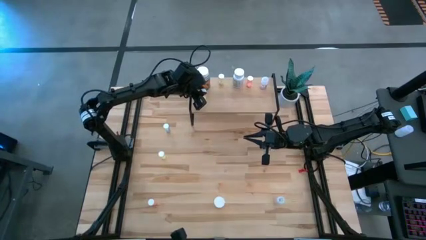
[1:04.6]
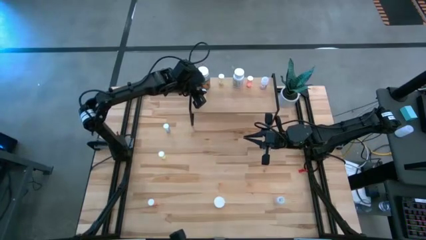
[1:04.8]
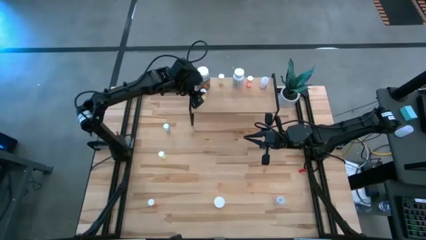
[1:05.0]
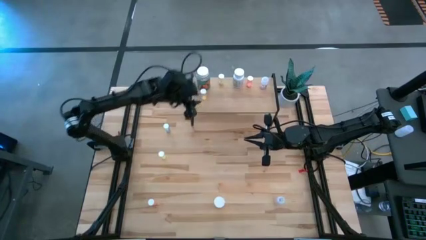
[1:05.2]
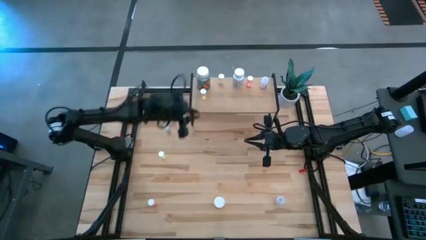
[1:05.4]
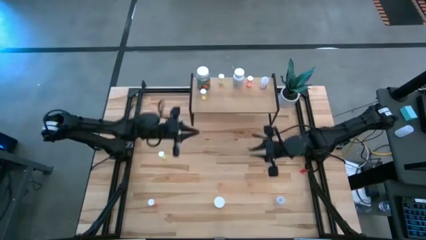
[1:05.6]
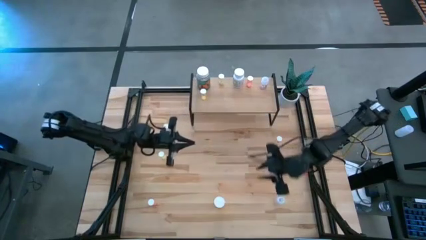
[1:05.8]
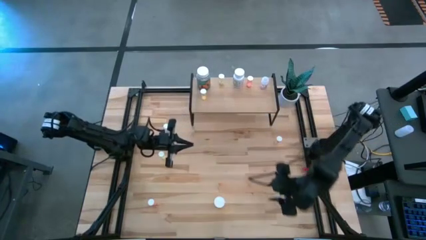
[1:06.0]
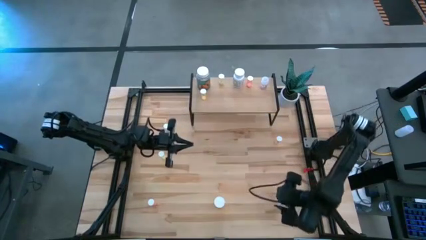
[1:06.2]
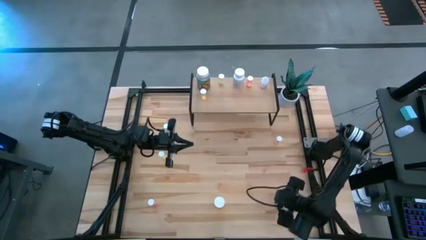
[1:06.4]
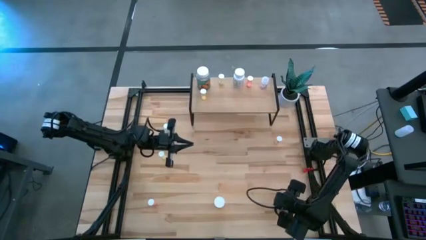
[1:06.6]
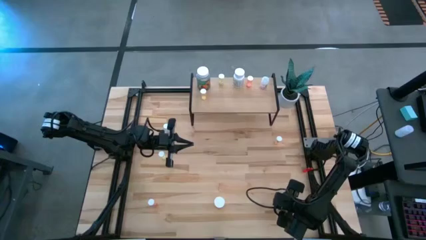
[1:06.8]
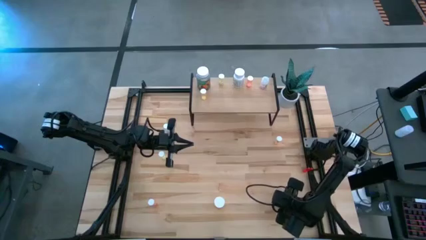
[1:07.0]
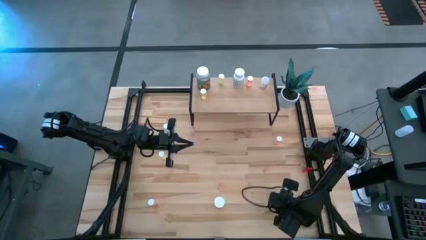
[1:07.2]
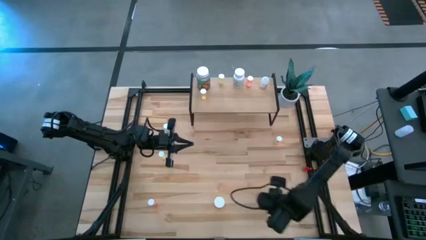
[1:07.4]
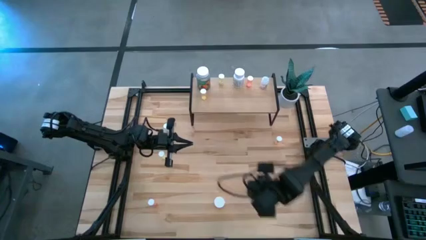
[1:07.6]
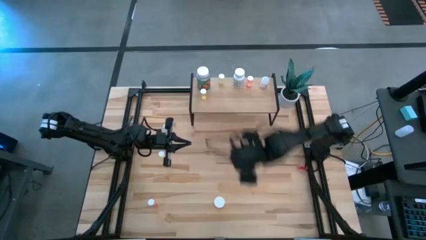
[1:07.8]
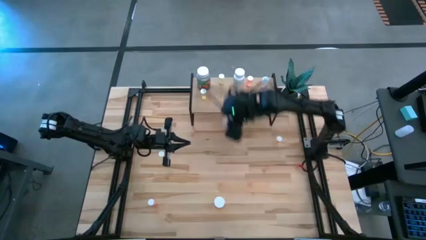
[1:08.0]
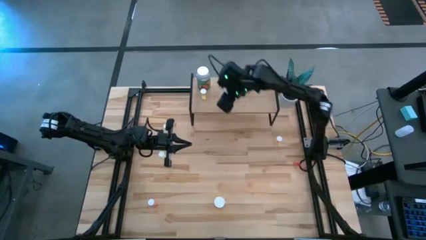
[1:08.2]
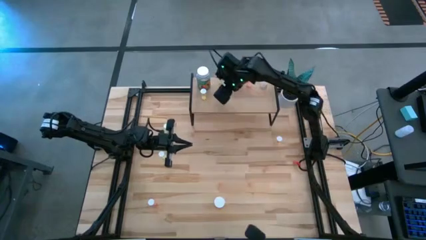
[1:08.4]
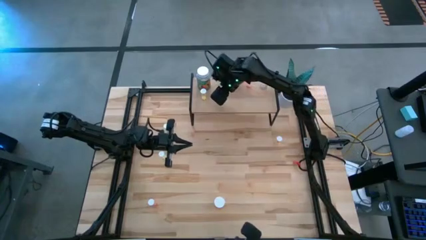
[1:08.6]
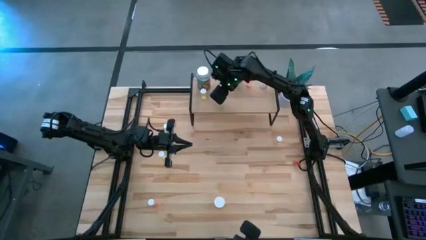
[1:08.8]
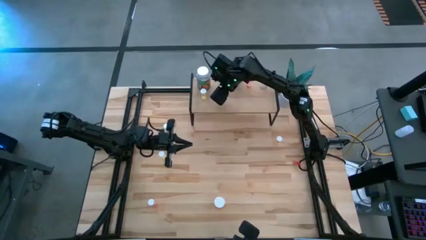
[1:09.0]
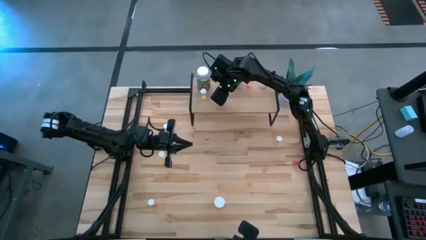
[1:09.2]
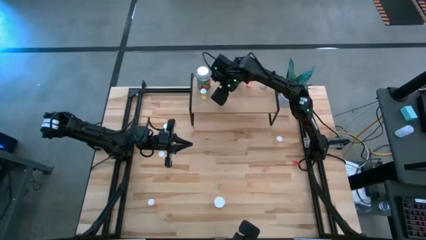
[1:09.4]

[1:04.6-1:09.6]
Task: Pick and place medicine bottles onto shelf by color
Put the transparent pill bottle on the shelf

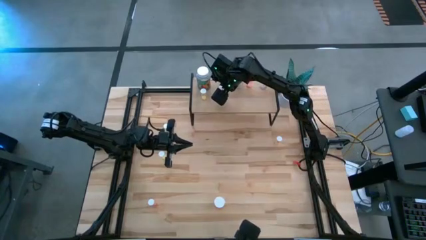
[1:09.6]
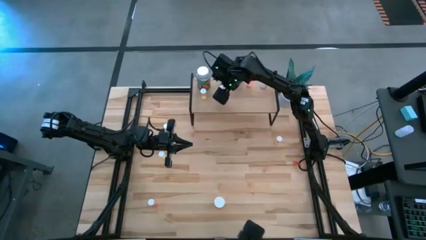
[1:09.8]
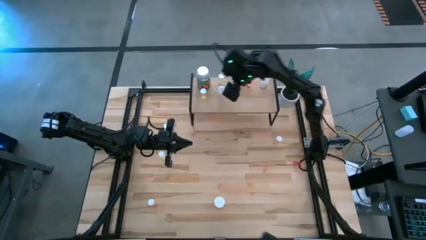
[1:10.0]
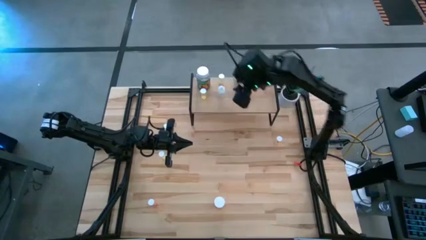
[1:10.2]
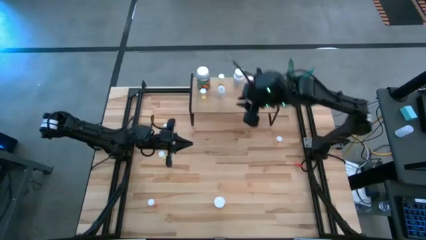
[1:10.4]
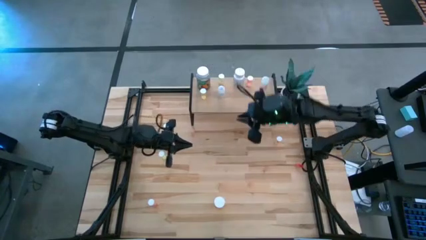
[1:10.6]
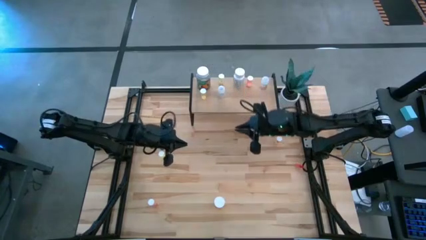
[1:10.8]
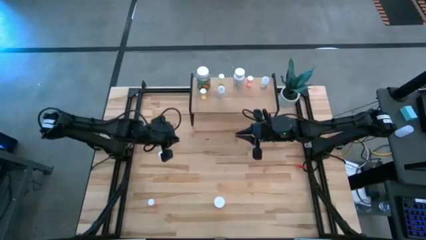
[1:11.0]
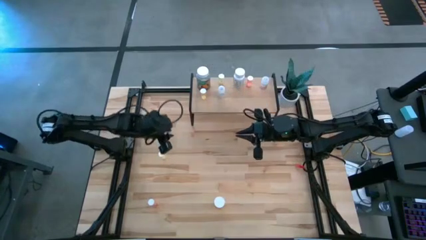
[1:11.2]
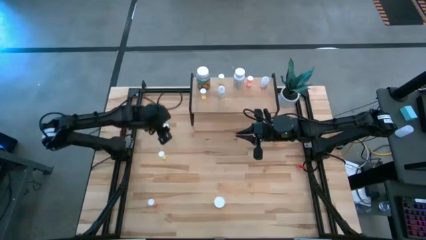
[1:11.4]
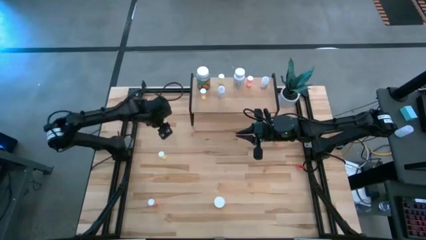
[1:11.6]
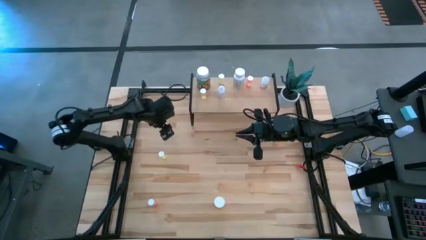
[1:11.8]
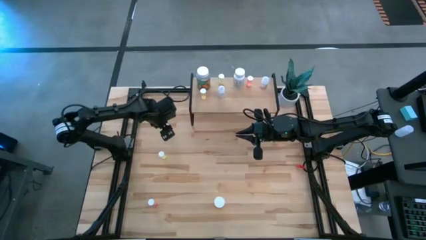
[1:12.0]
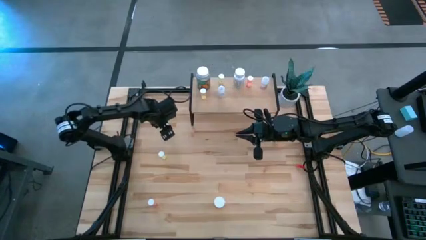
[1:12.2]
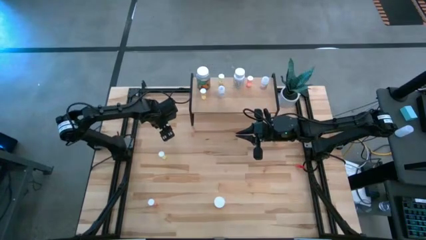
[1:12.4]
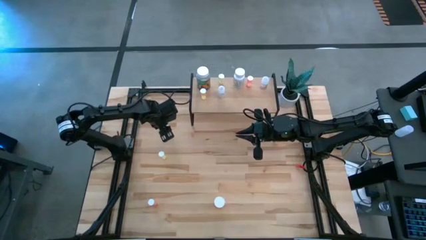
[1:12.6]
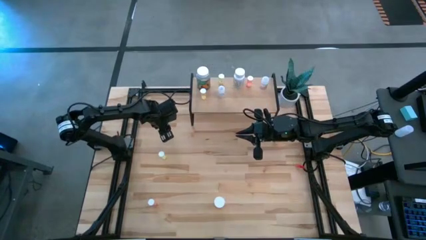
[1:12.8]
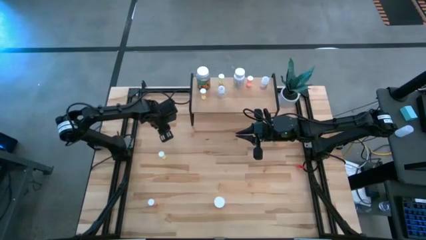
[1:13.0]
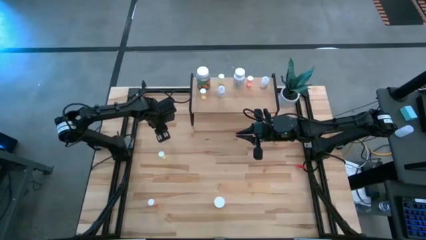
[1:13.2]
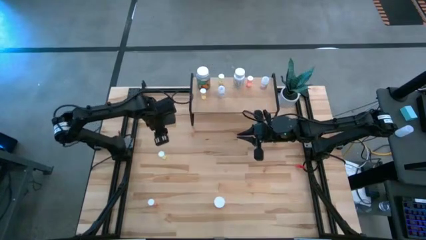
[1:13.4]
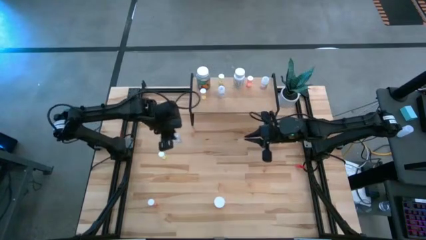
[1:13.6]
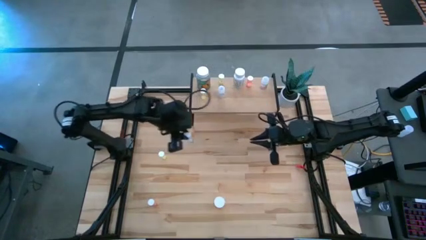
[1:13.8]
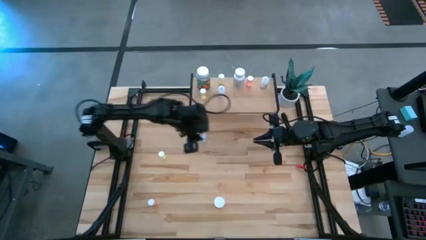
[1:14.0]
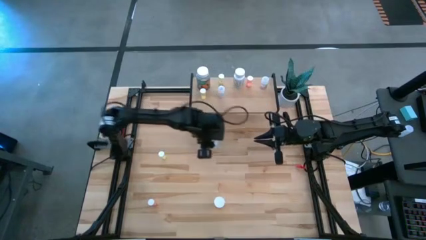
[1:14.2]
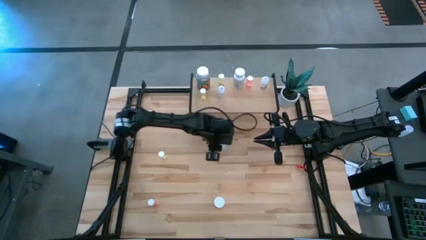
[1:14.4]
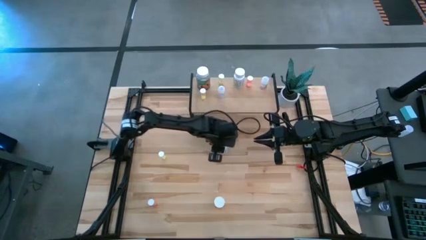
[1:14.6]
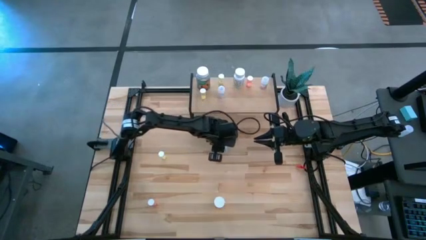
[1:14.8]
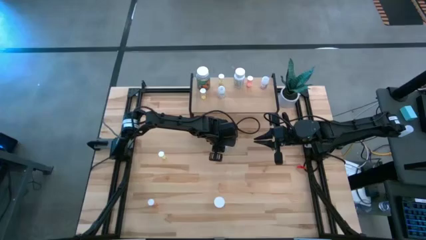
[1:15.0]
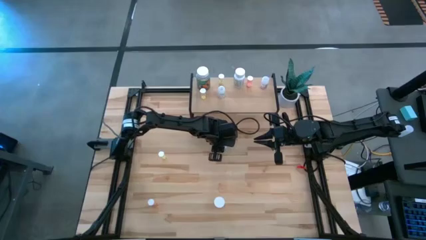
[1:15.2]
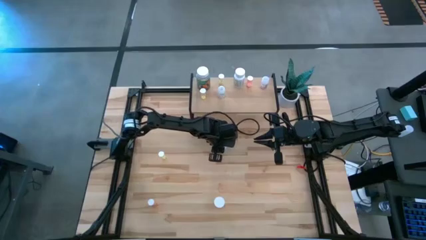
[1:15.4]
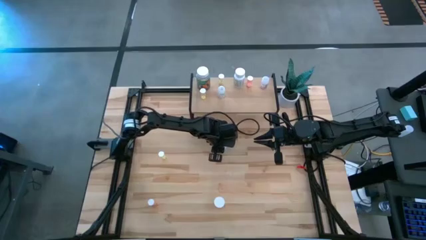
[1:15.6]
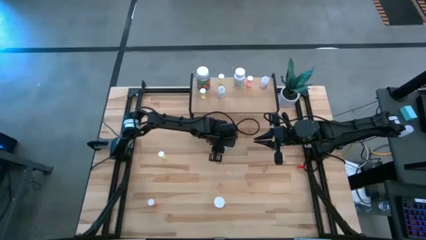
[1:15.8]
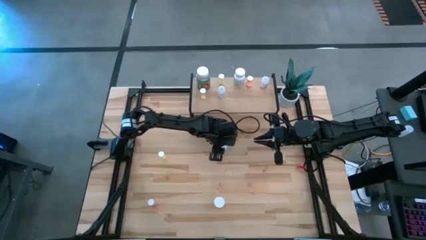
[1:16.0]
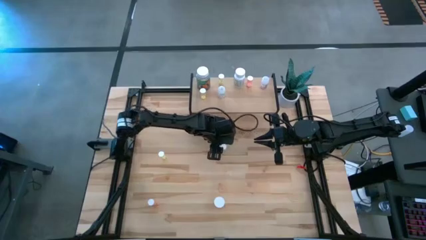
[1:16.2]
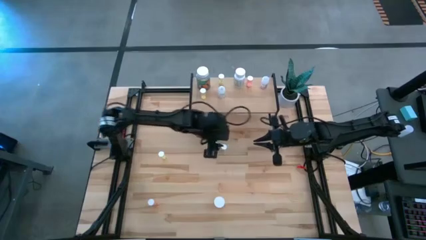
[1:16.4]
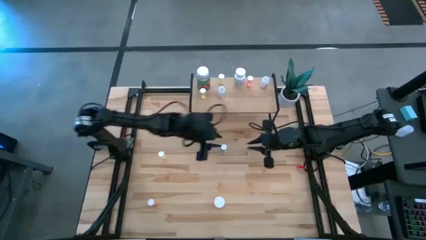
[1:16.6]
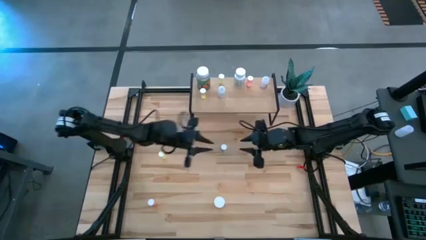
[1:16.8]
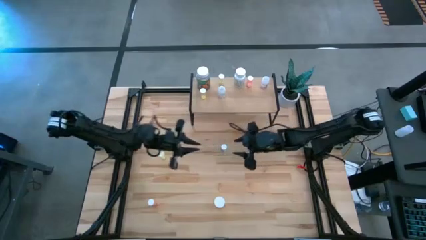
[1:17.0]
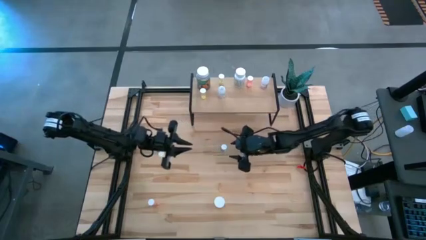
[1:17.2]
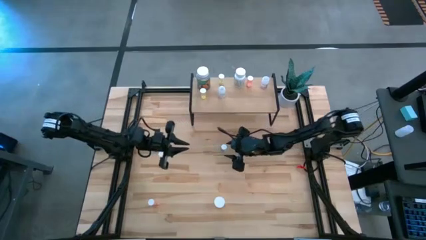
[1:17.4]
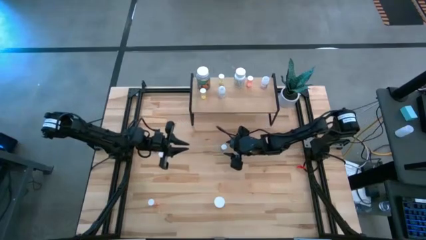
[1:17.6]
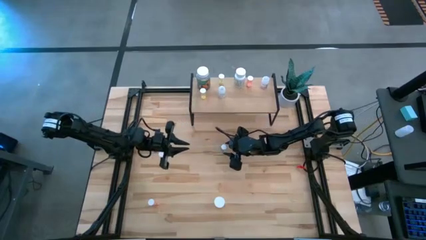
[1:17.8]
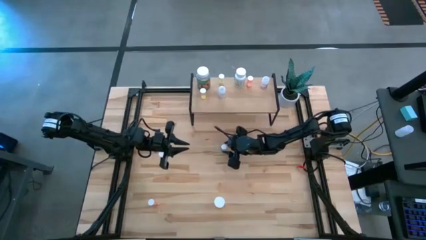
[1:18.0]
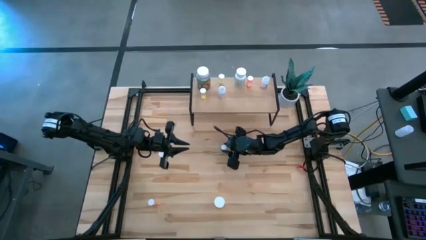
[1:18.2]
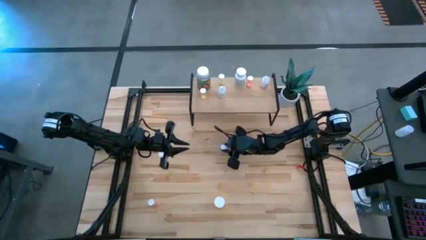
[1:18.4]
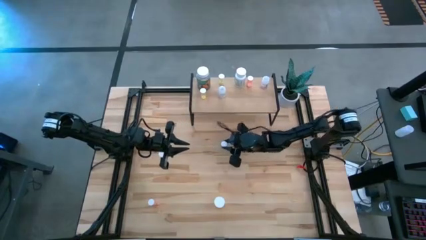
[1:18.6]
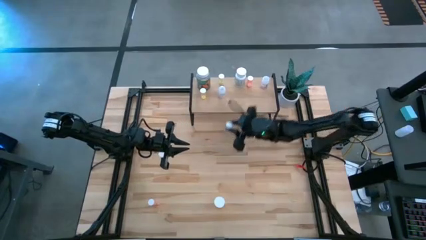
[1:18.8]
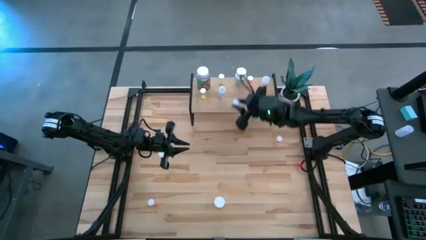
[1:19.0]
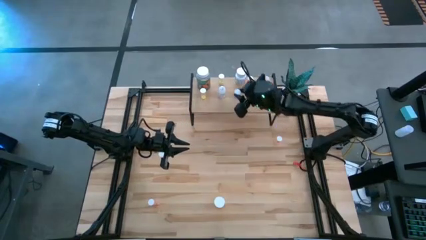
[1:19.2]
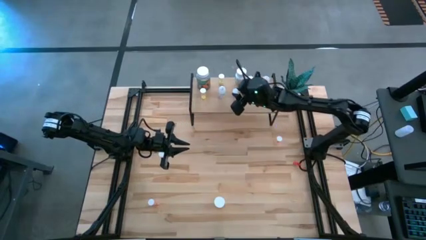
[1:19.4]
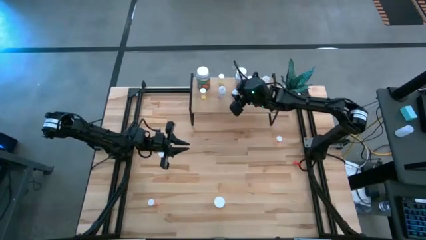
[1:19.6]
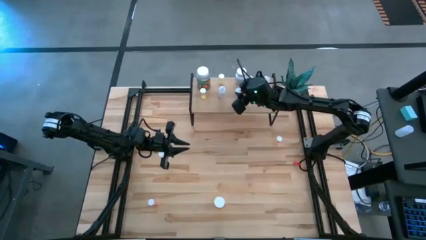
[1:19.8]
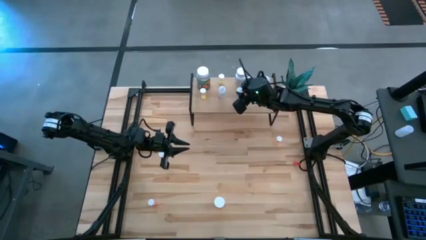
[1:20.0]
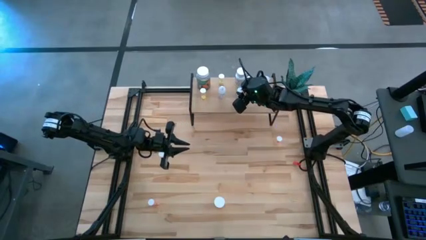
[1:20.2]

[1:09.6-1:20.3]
Put the blue pill bottle on the shelf

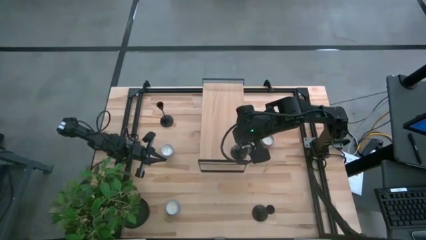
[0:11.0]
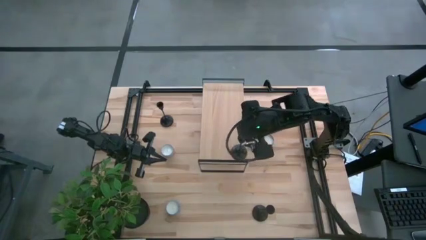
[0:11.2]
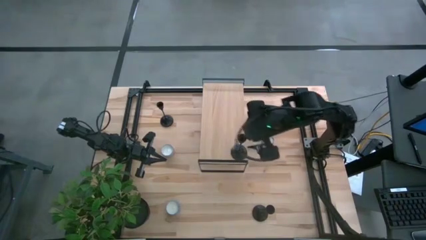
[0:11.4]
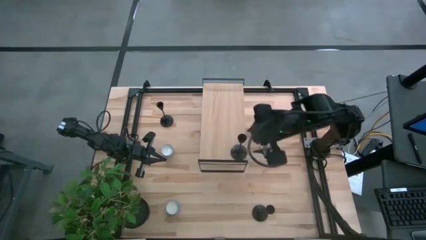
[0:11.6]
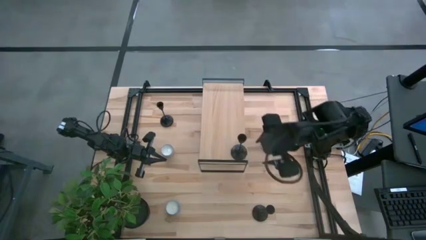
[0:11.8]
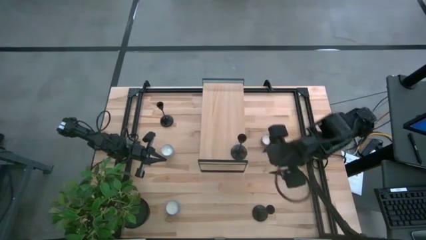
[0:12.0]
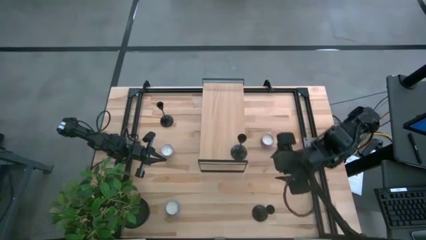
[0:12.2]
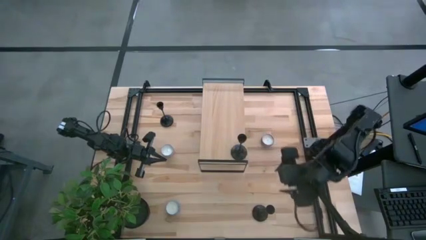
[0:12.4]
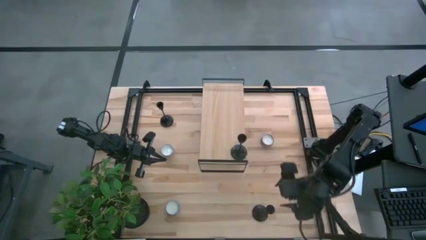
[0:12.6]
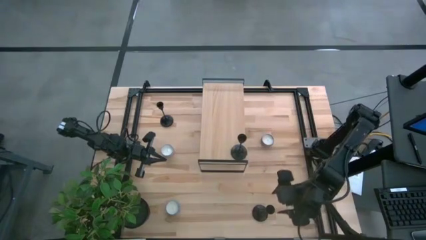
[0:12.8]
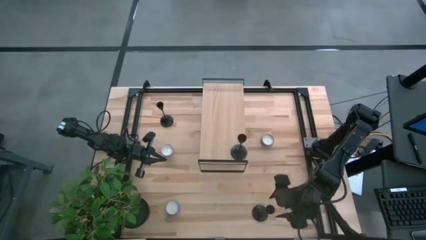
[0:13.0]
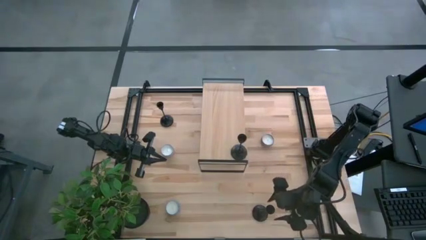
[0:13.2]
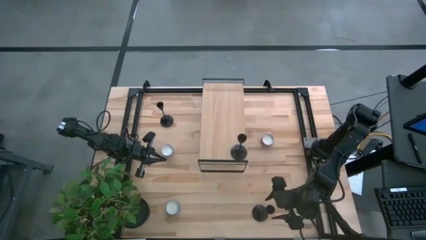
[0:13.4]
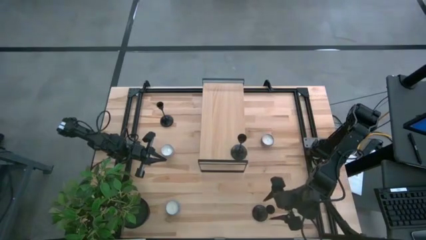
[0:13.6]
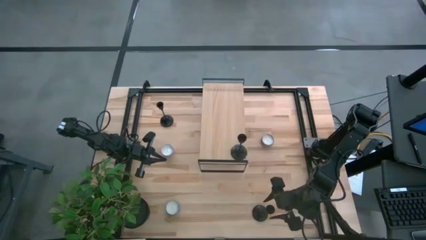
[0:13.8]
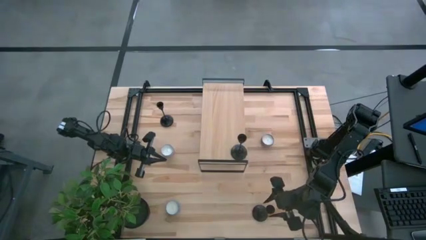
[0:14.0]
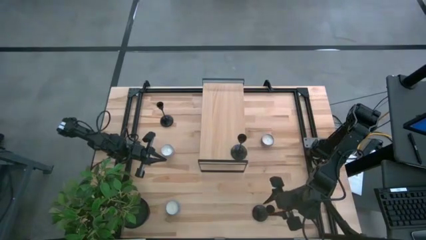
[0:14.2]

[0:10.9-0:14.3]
Task: Pick & Place candle stick holders
Put the bottom black candle holder on the shelf aligned with the other black candle holder
